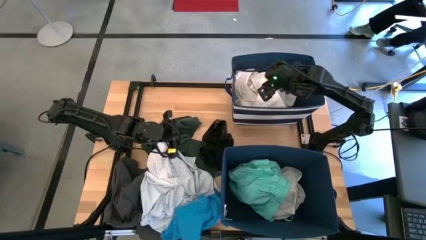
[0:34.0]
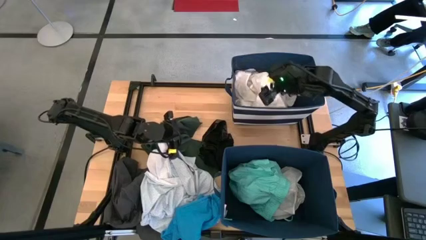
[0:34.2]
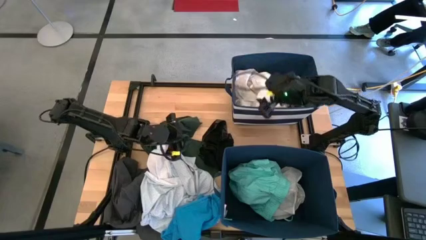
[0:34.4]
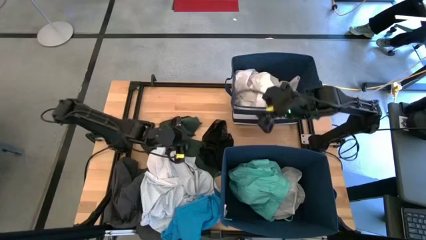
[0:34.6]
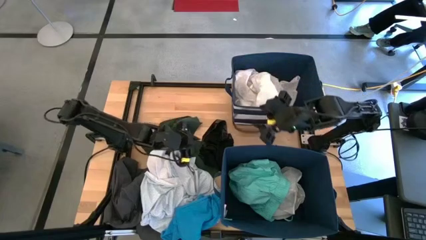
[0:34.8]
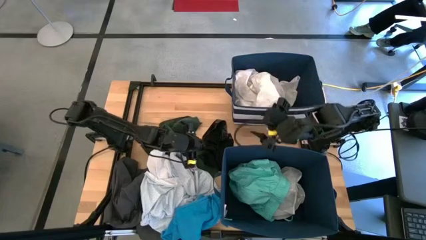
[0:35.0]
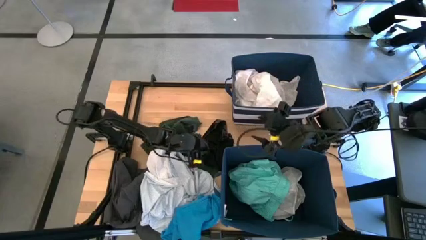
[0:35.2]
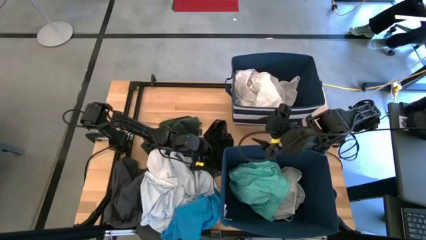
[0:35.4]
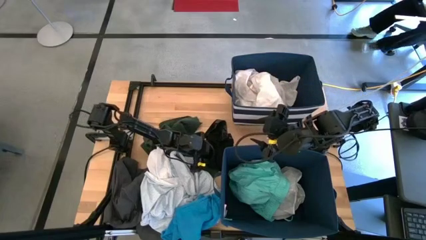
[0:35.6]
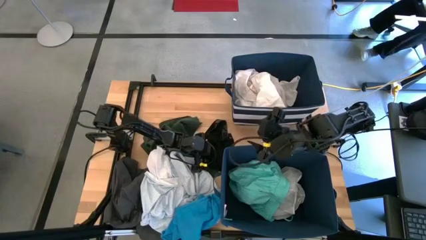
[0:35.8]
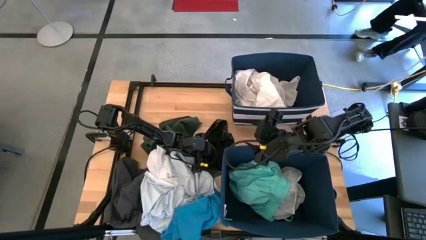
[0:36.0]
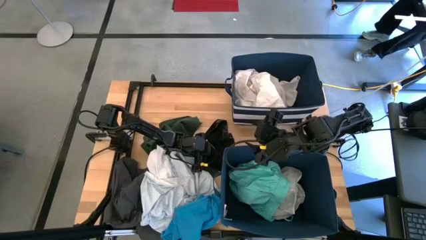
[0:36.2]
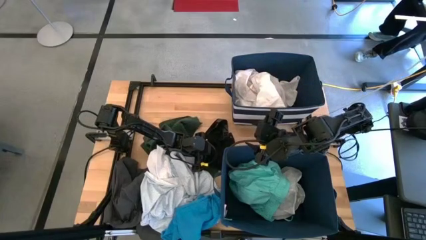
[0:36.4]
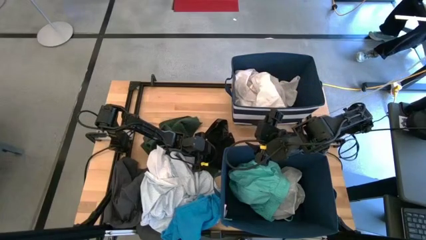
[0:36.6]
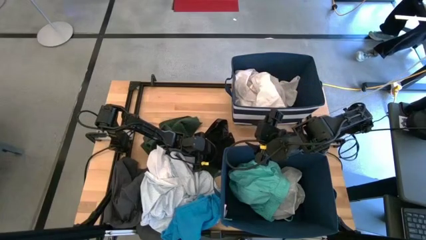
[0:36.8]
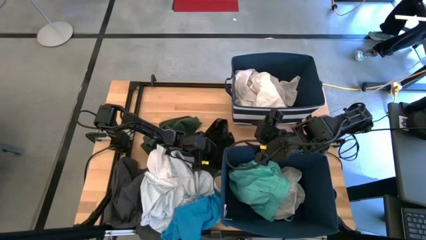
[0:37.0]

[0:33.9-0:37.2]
Task: Sort clothes
Put the black boxers into the top blue bin

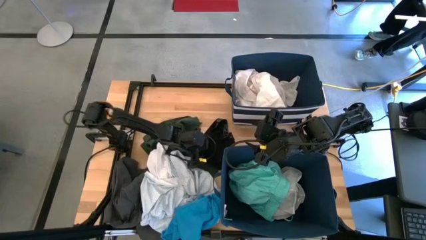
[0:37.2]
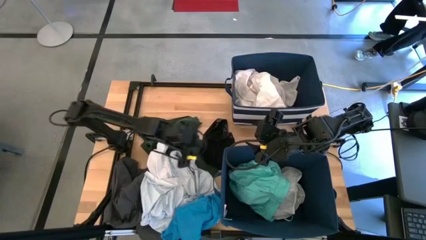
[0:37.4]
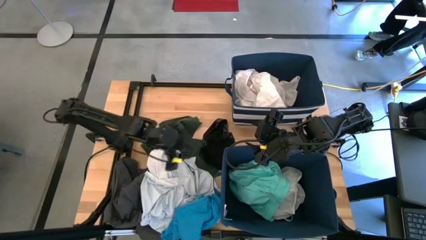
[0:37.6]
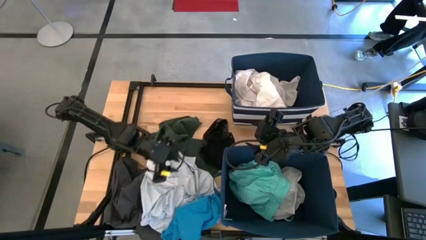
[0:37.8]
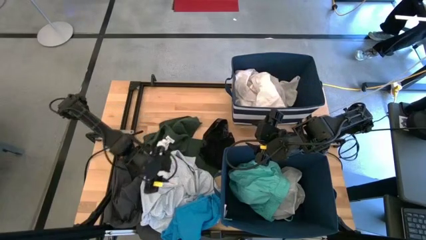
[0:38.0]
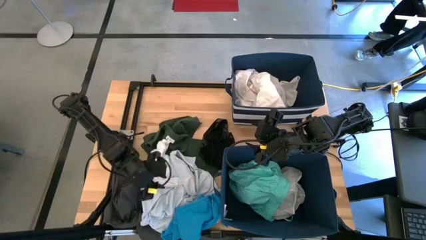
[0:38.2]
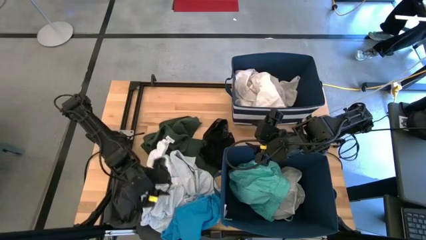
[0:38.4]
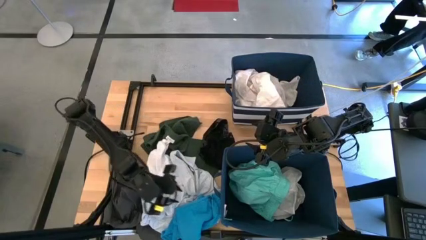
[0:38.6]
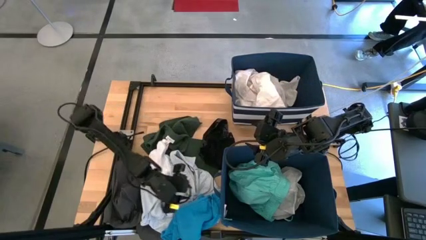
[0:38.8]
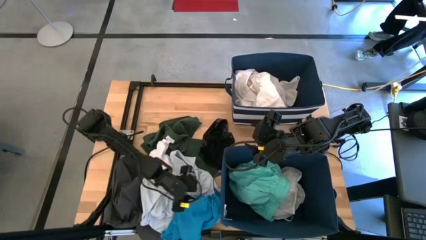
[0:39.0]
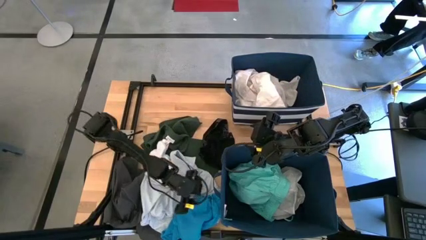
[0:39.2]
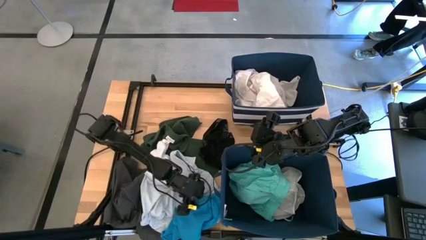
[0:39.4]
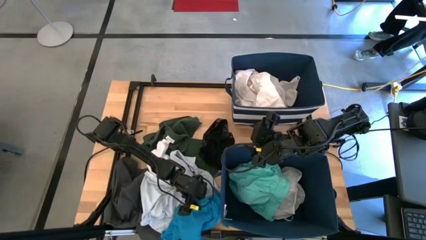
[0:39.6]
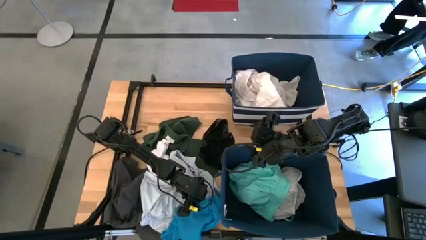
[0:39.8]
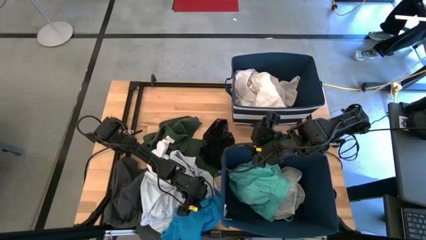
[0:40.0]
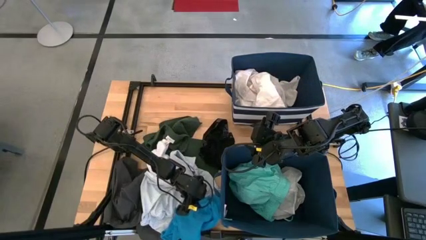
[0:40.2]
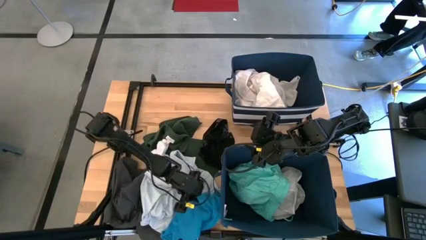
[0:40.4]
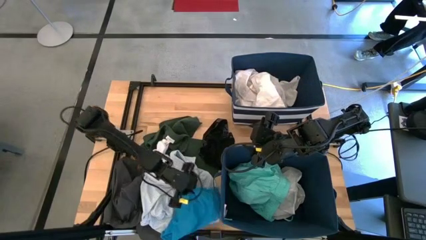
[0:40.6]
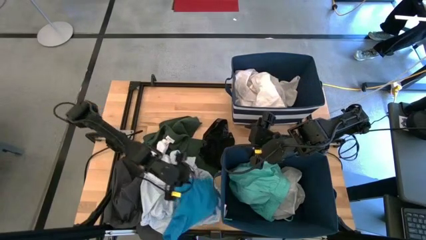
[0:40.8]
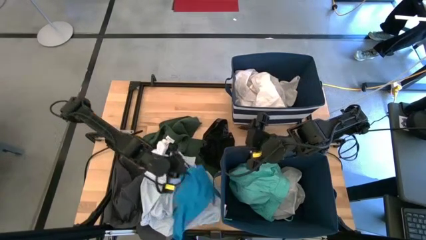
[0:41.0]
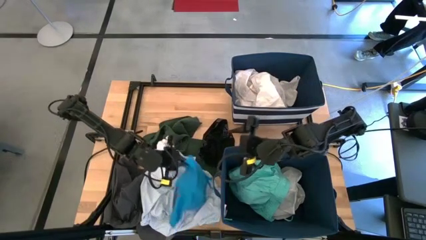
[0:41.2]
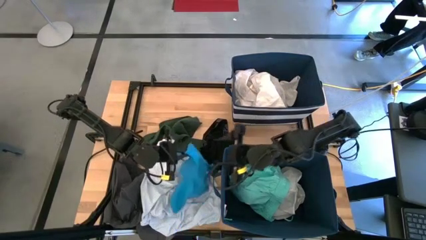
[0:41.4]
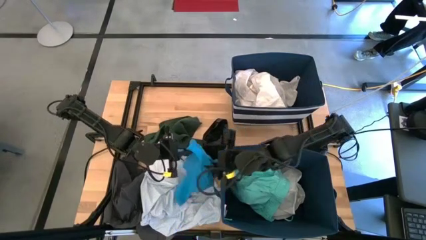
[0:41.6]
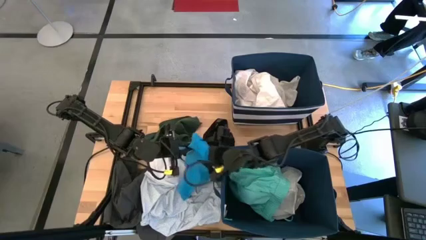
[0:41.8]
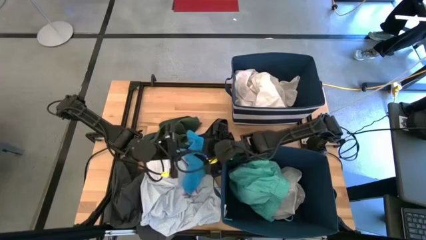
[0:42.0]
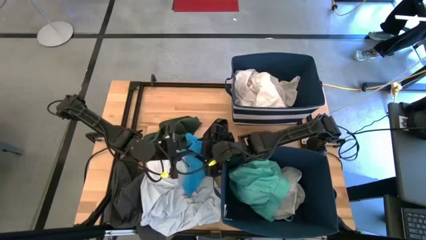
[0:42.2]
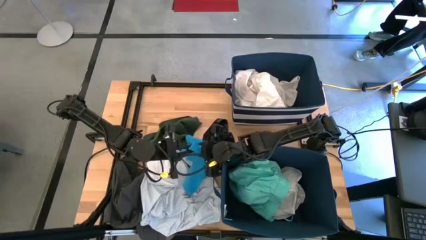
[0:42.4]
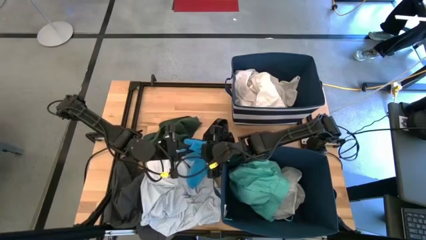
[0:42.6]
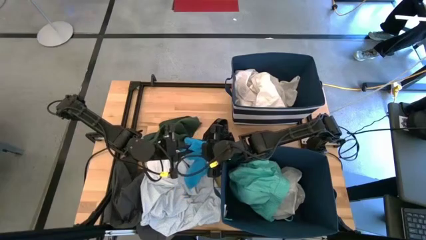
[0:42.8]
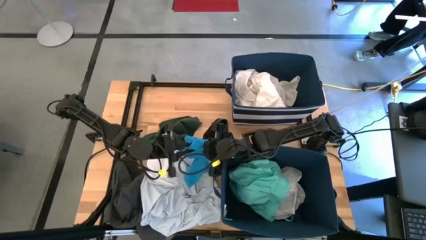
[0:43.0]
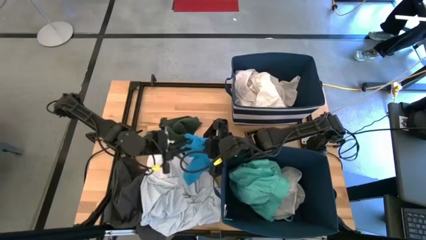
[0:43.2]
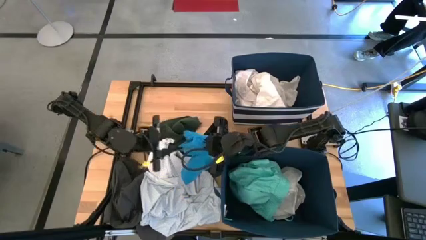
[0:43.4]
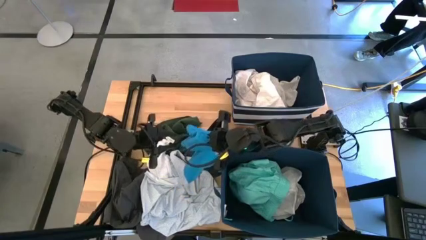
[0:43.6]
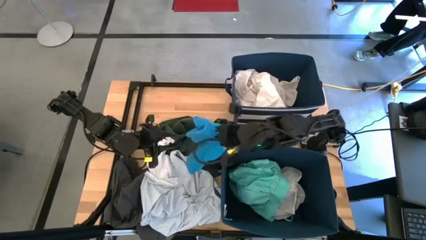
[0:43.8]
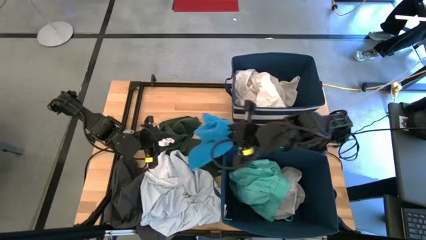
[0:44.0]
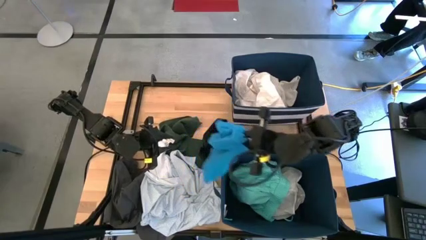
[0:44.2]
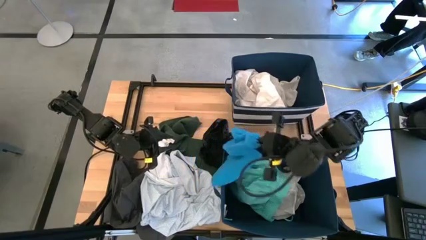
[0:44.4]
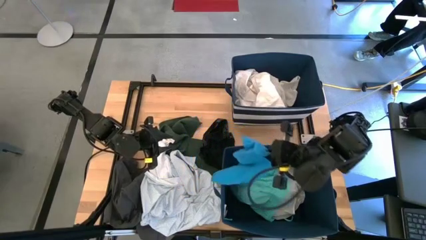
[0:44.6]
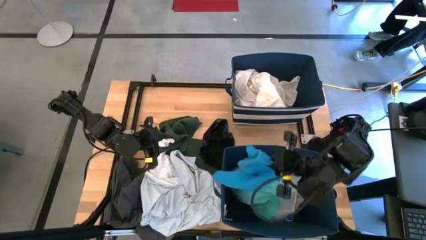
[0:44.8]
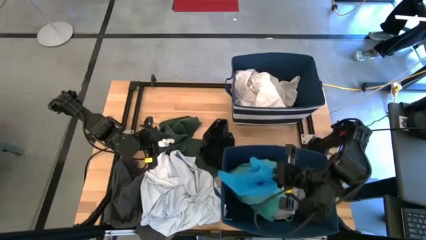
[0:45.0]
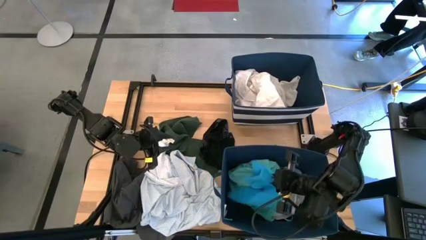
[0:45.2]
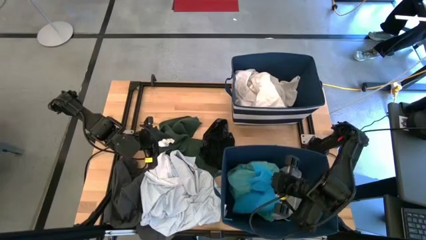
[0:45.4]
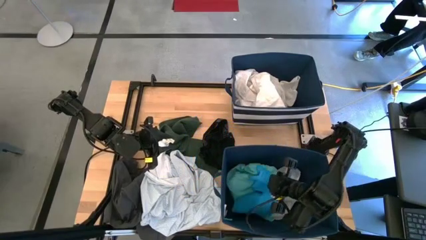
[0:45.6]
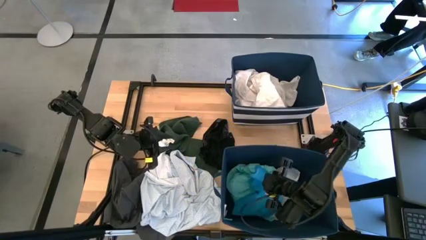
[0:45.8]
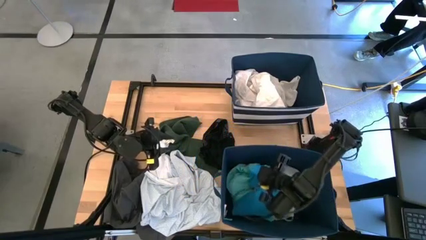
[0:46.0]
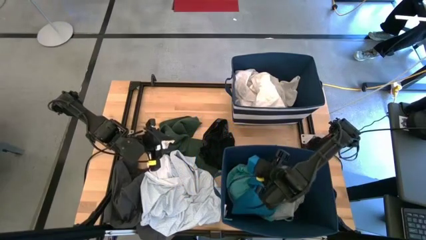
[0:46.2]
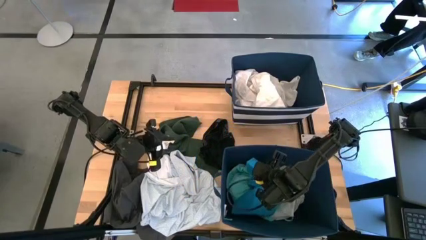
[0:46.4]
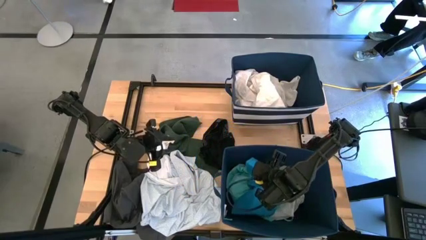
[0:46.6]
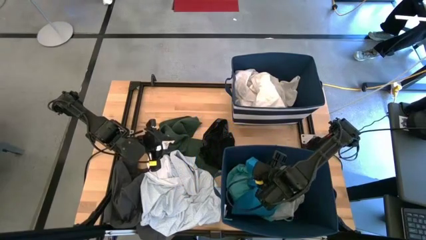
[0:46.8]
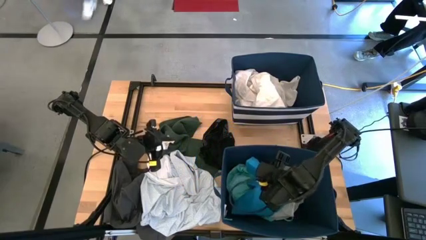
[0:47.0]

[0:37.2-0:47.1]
Put the blue pants into the bottom blue bin

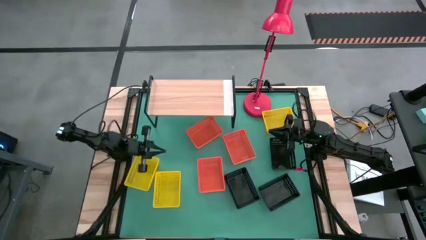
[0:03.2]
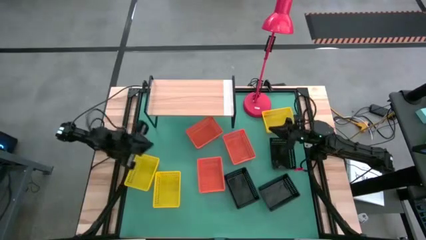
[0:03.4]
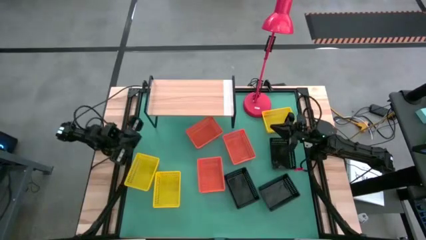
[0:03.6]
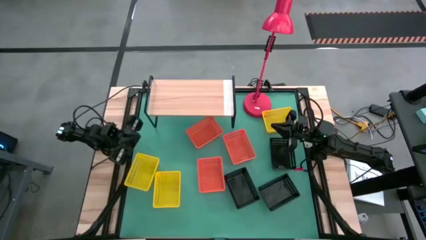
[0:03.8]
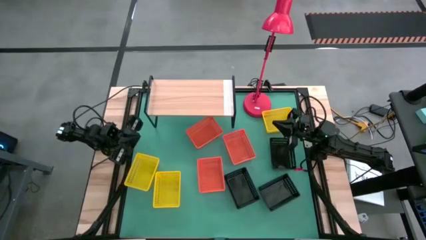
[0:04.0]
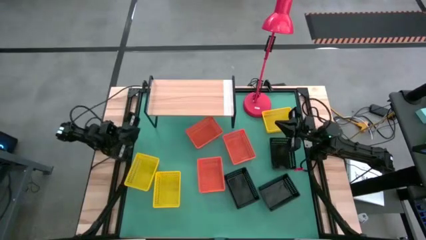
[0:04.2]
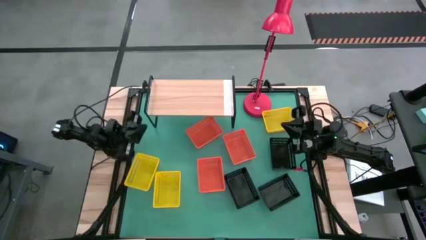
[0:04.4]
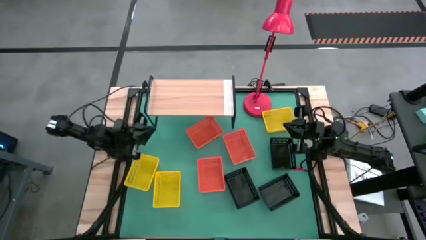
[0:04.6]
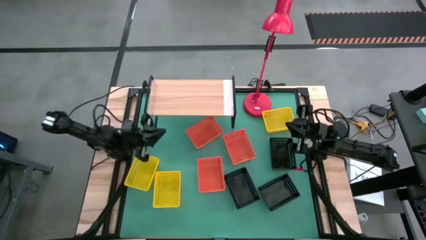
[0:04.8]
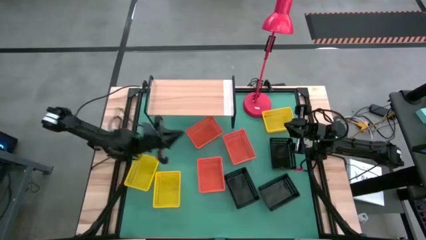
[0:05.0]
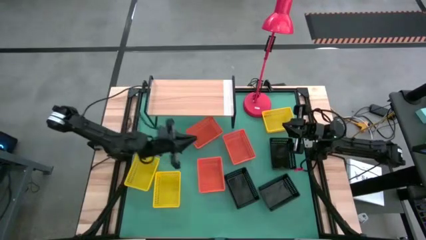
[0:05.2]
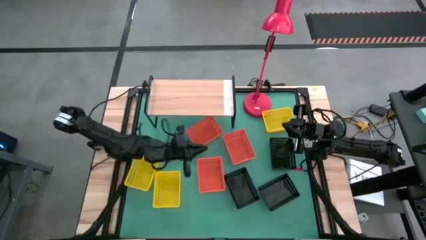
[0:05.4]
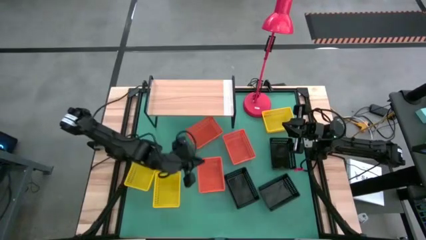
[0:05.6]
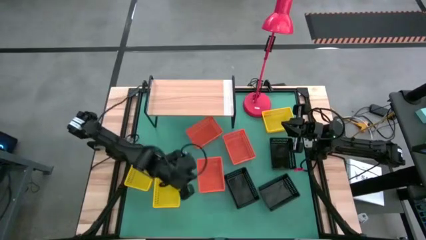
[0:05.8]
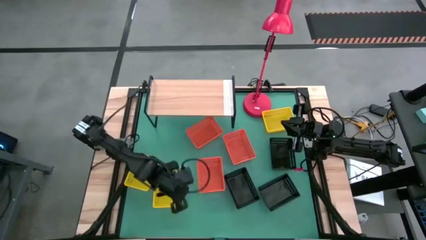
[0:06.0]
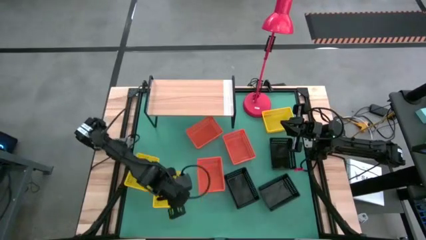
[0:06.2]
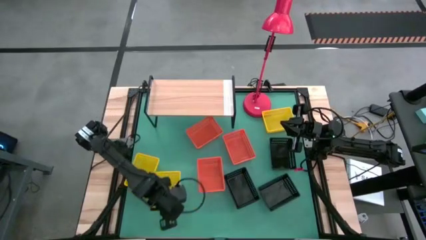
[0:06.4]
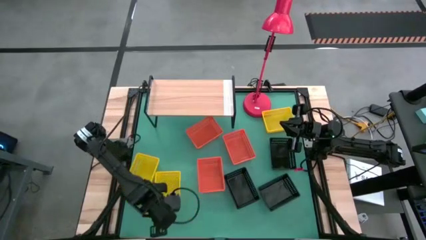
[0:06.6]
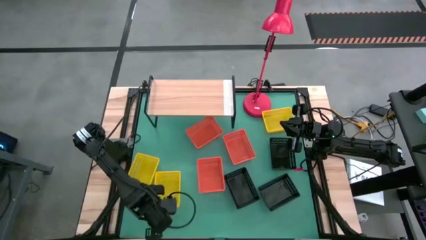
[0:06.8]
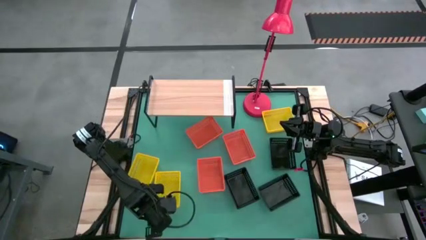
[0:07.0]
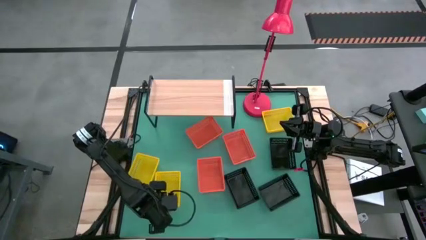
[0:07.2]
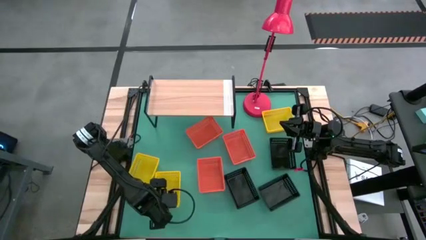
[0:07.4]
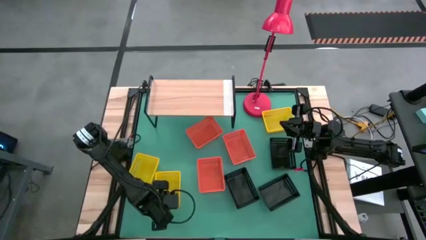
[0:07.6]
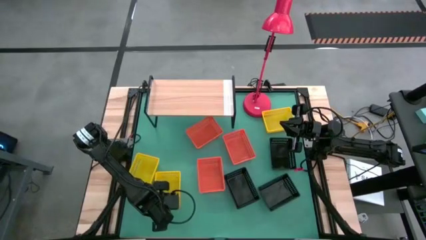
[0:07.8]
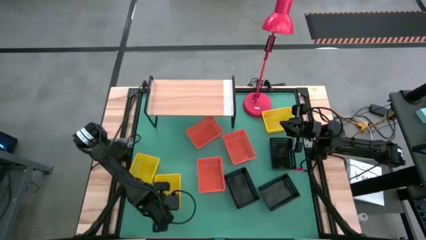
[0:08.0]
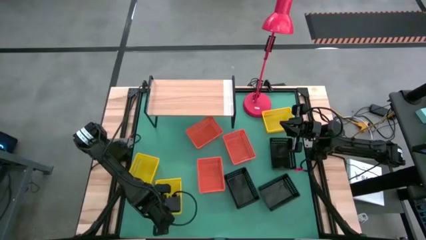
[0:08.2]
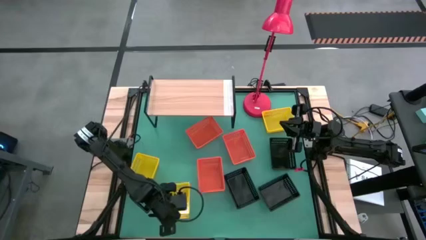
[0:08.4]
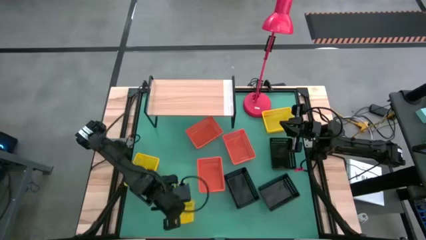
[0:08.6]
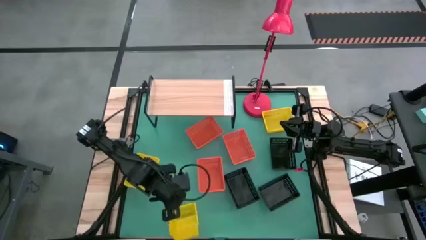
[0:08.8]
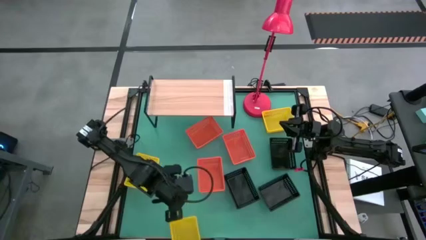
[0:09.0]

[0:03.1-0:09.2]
Task: Stack baskets on shelf by color
Put the bottom right yellow bin on the shelf
